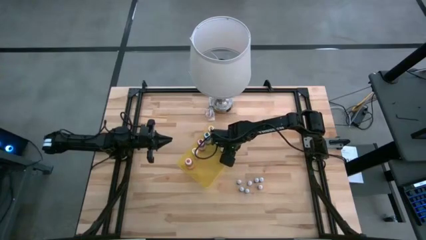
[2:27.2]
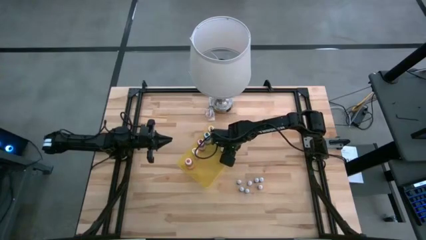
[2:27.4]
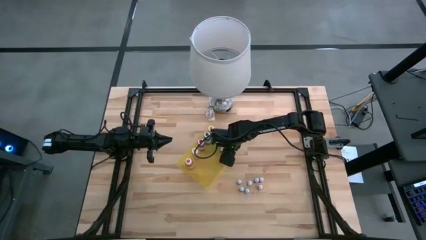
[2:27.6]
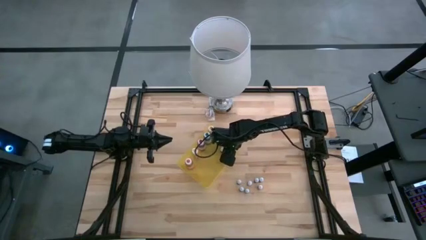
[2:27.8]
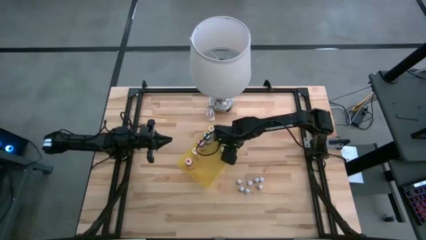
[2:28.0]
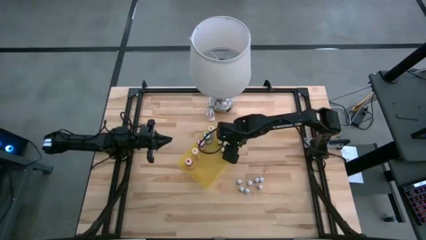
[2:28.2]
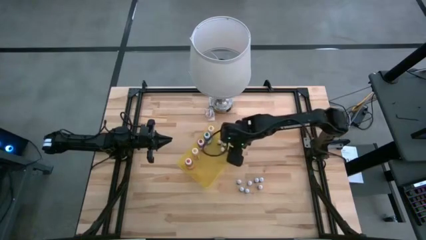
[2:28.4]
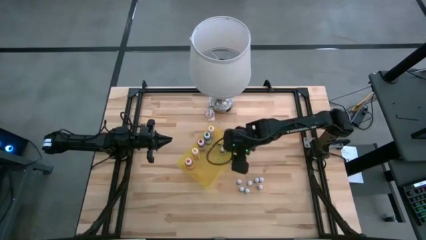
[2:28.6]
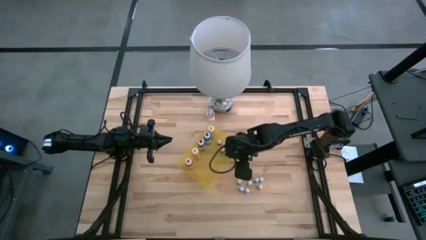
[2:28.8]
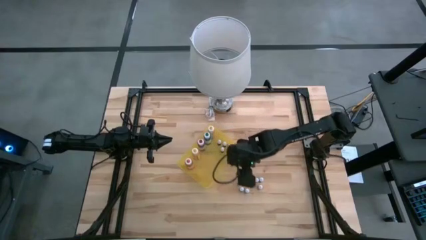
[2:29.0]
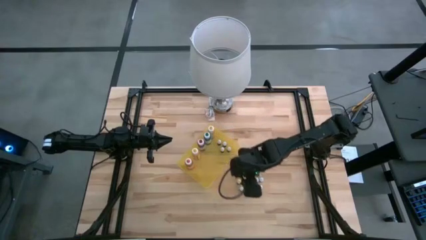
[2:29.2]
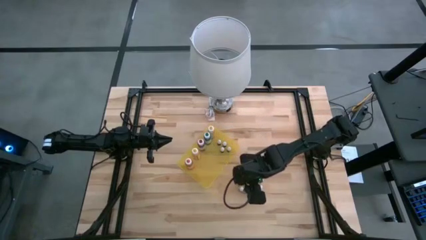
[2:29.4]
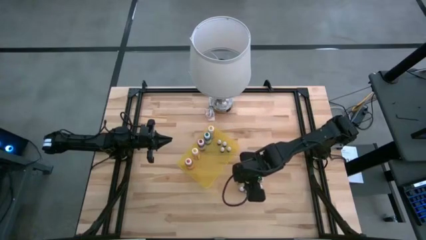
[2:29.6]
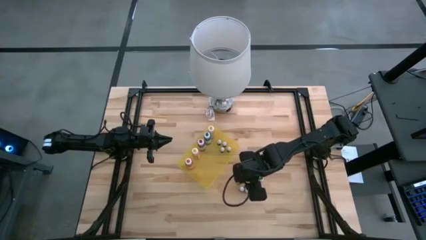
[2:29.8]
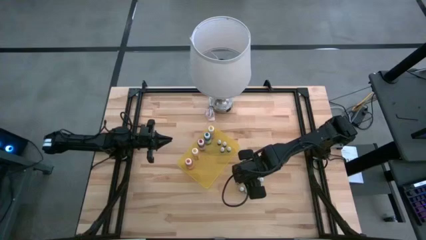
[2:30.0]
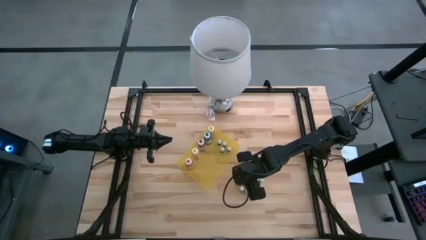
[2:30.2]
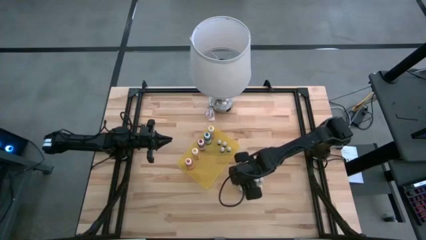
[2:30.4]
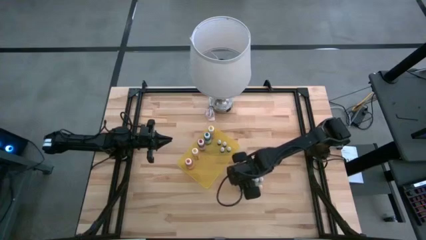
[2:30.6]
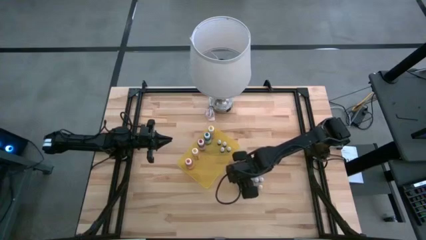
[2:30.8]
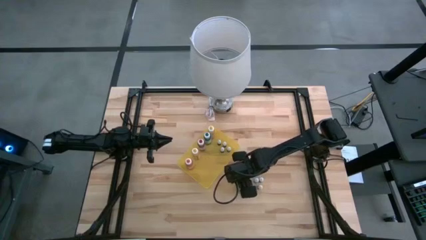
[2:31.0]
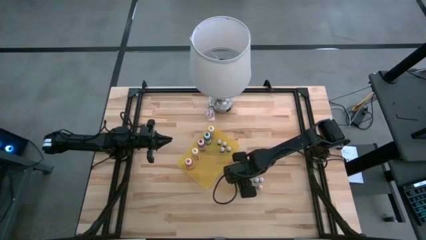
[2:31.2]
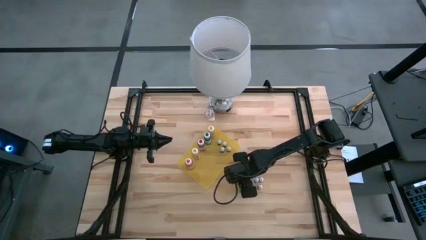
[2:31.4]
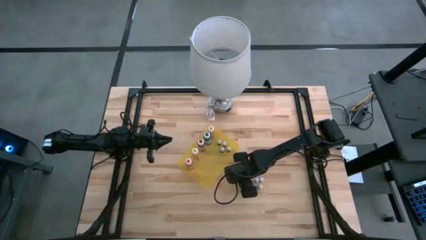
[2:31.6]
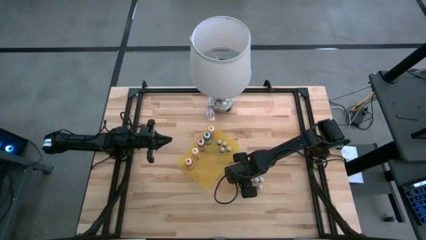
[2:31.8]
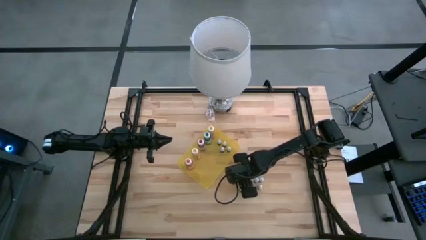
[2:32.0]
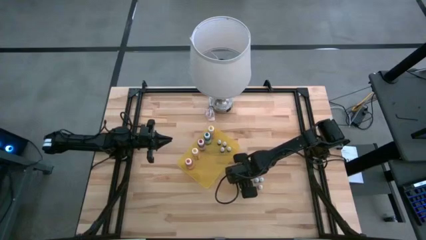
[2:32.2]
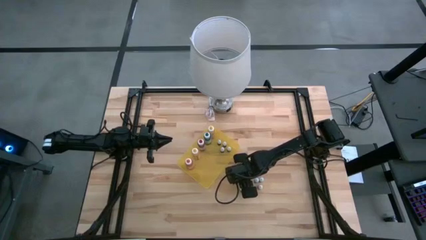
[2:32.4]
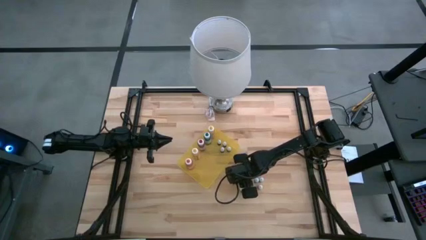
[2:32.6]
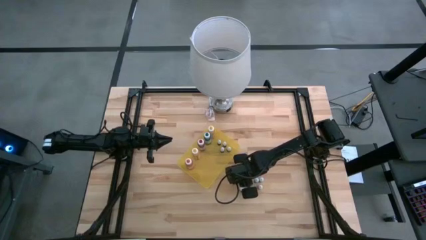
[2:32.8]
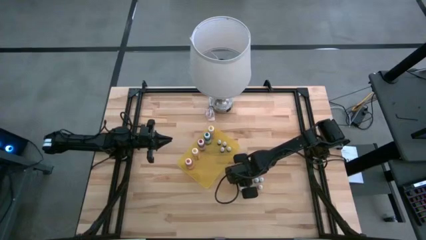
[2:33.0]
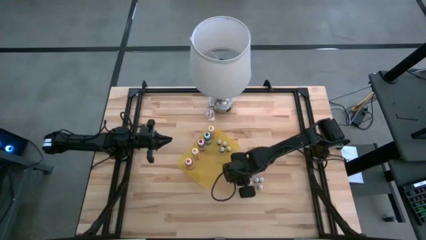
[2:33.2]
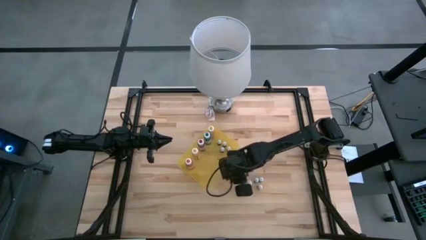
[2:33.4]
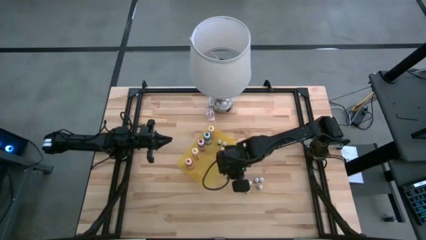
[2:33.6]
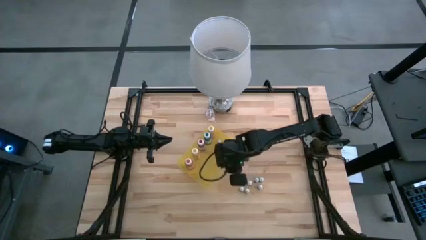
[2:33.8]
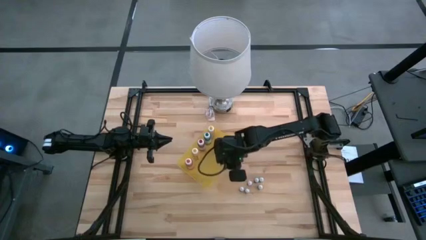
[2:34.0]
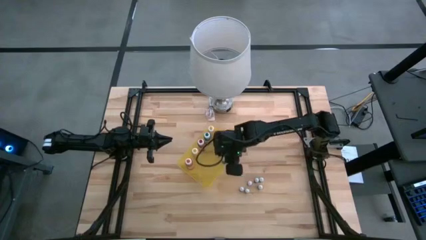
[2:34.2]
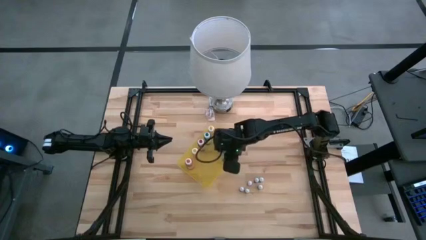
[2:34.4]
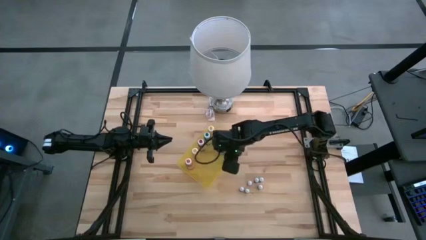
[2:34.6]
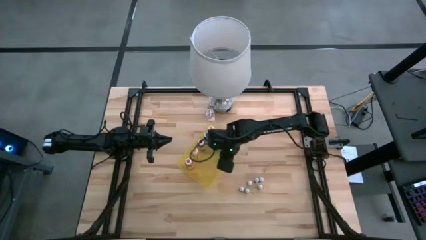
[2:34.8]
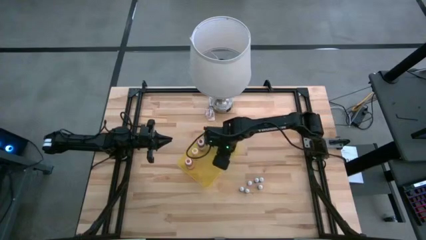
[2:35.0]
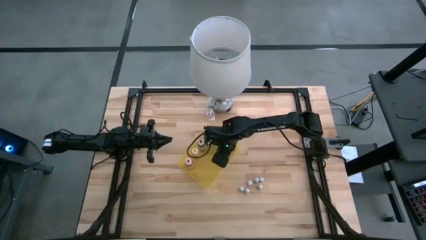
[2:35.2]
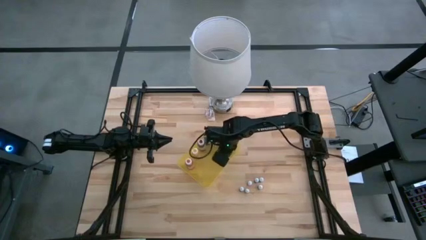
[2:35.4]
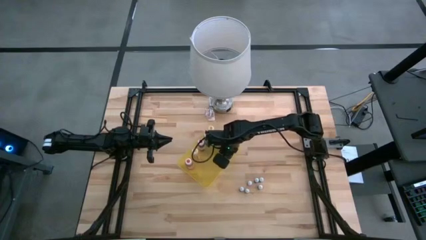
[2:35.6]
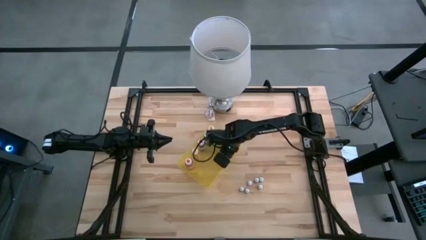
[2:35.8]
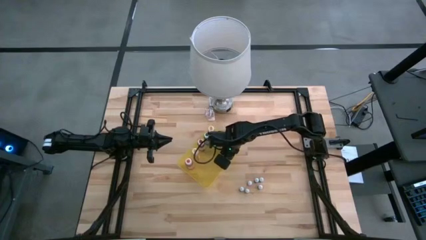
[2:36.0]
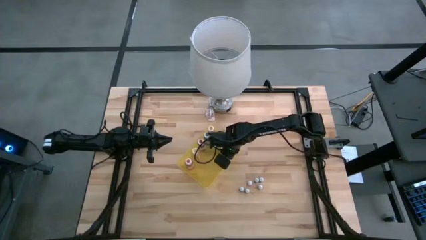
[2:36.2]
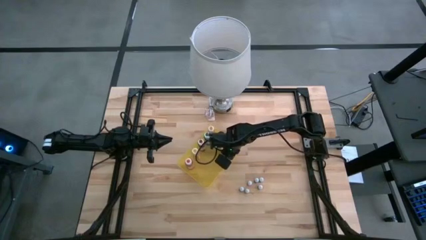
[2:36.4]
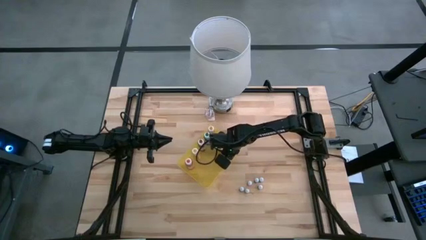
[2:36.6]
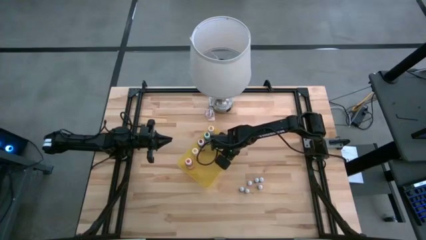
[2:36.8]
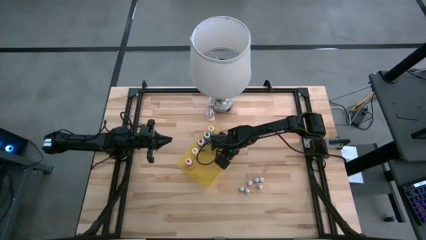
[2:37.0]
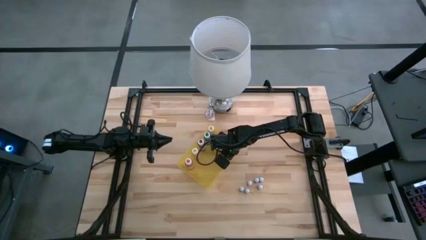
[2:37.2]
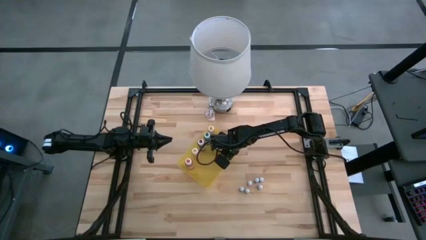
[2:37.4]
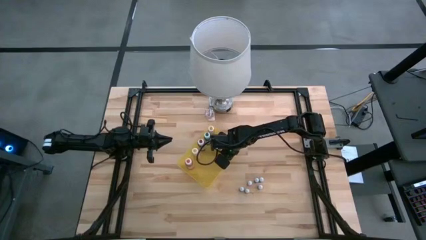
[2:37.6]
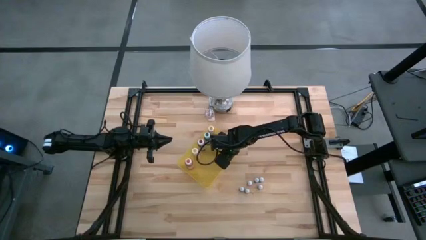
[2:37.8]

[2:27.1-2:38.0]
Task: Pick & Place food coloring
Put the small black food coloring bottle into the yellow bin

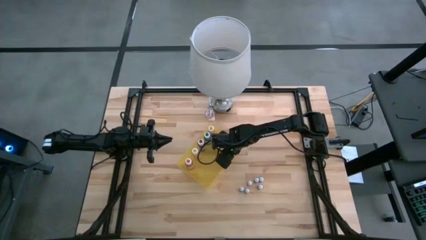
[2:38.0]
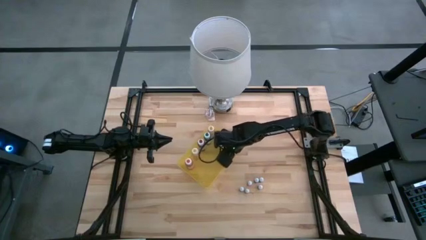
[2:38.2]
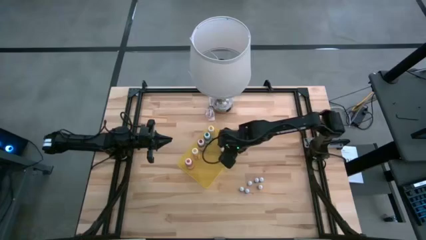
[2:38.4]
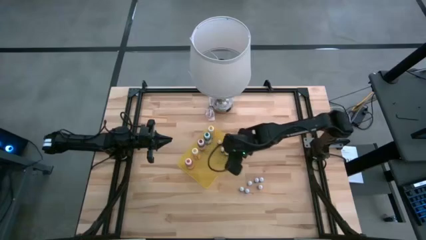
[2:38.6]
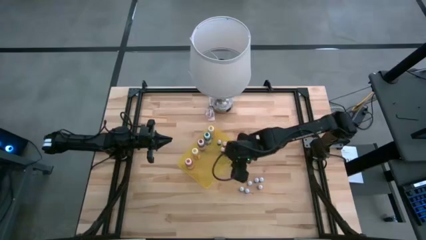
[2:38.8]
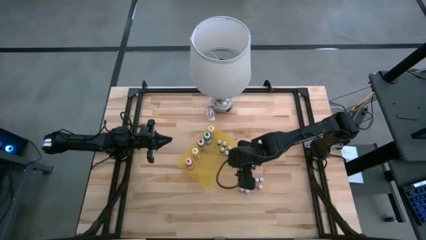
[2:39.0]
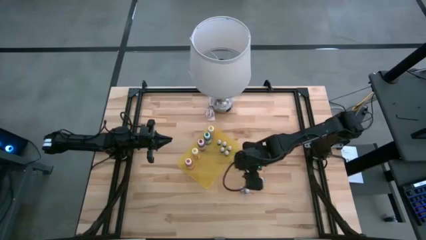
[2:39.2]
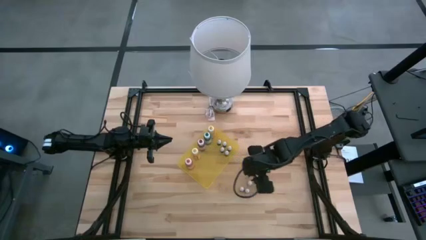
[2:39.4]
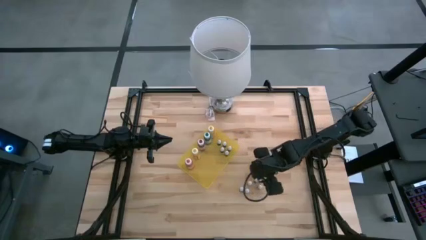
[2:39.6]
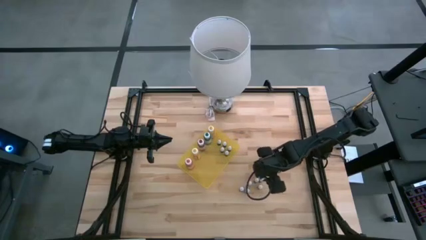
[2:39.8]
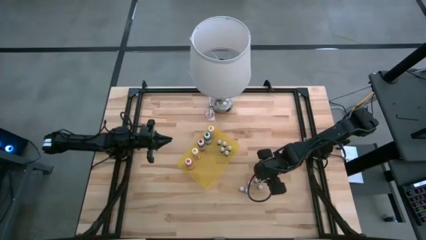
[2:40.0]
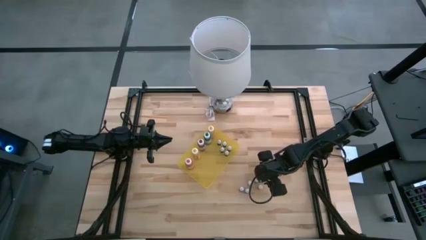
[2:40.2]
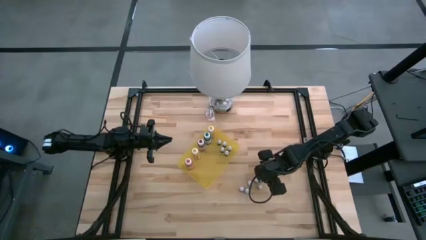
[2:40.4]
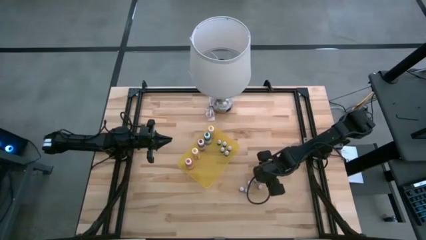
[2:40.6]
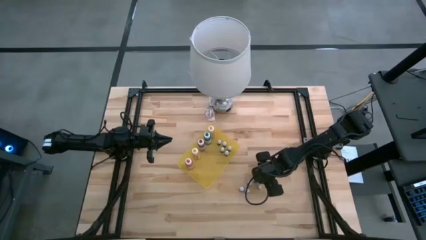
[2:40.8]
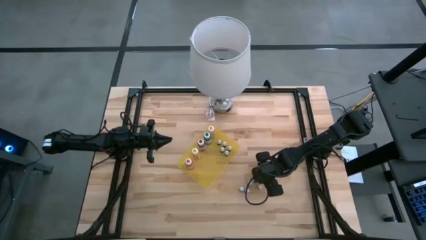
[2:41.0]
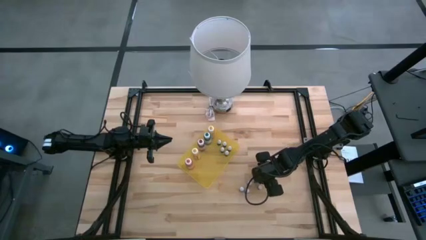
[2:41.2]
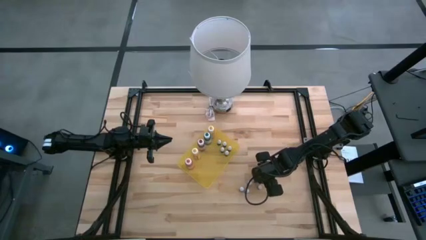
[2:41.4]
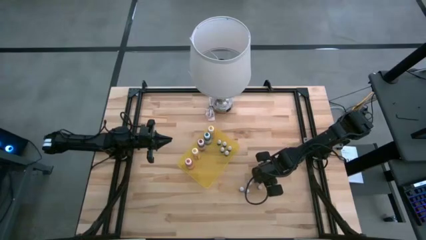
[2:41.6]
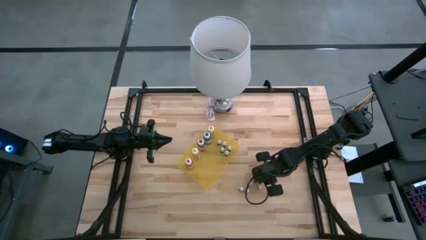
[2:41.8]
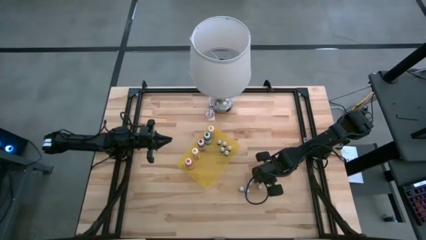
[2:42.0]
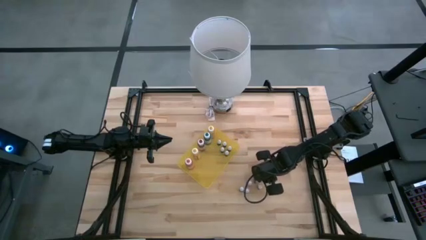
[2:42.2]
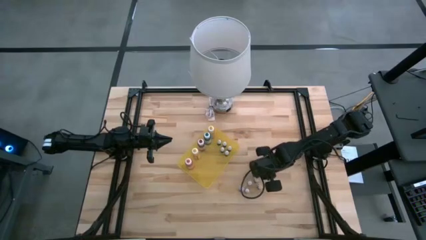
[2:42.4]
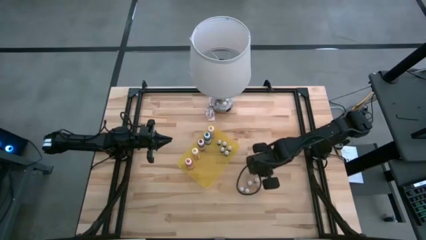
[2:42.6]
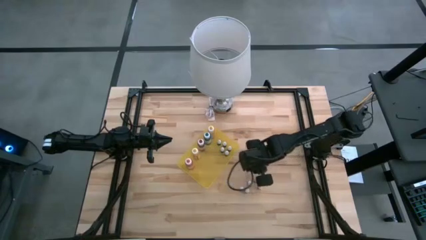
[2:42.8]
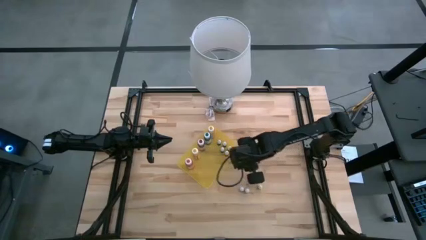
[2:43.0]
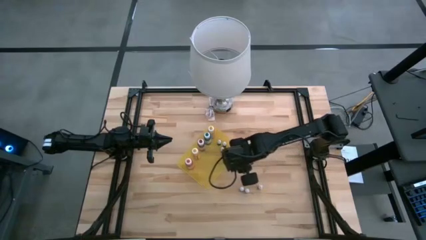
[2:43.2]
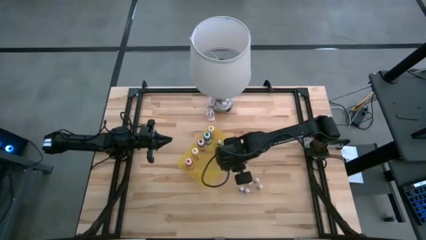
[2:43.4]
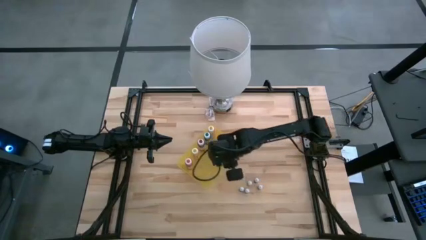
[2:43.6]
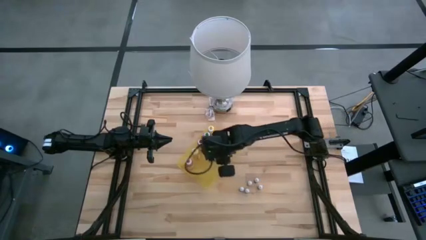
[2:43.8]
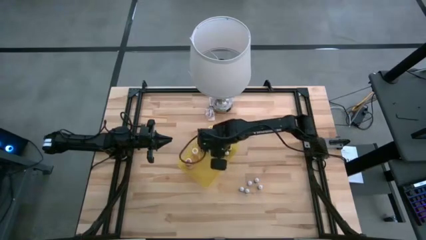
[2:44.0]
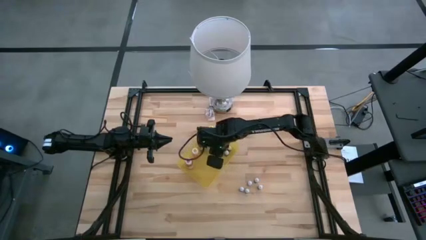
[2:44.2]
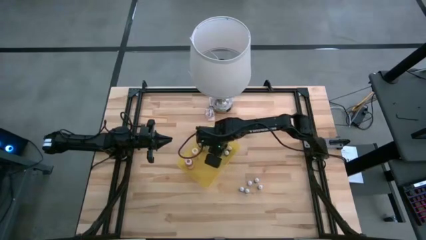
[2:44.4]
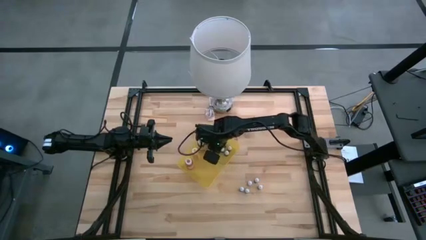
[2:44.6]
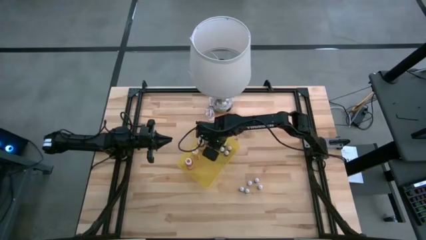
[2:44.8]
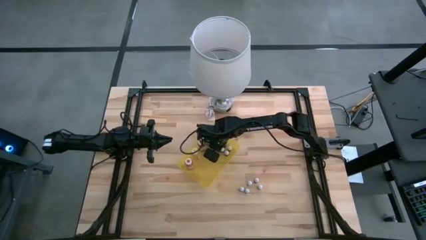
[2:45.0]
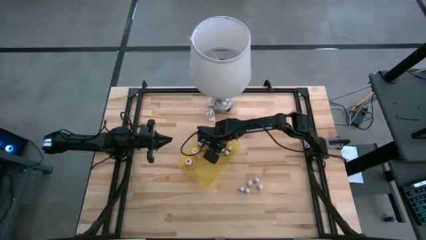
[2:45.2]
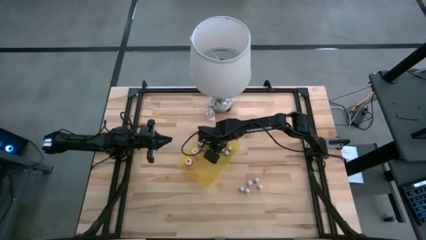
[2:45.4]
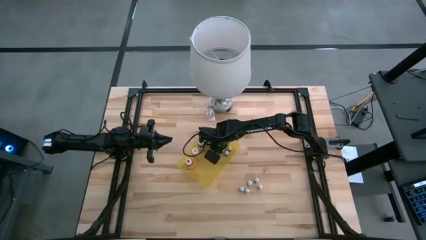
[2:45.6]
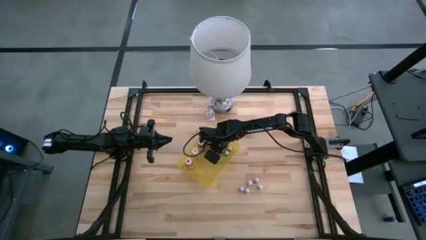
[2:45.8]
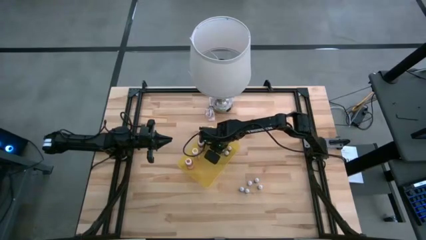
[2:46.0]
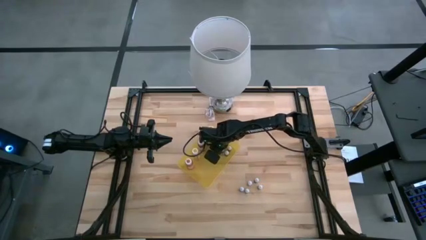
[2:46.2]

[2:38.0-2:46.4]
Put the small top green food coloring bottle into the yellow bin
